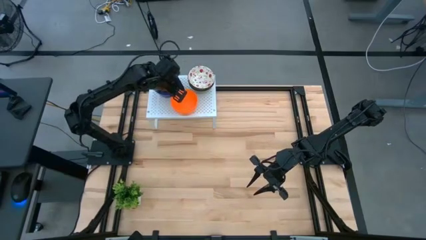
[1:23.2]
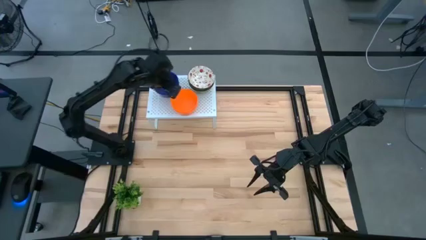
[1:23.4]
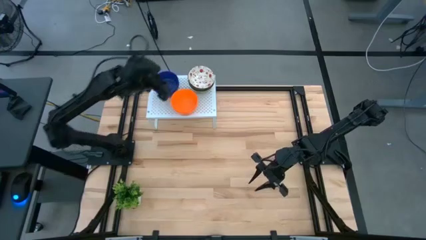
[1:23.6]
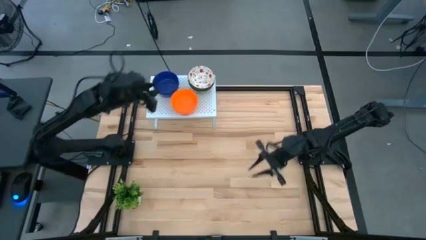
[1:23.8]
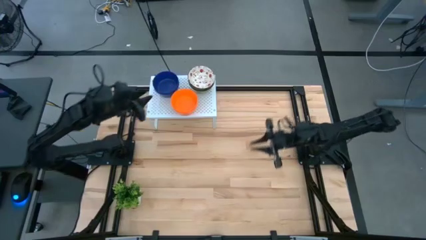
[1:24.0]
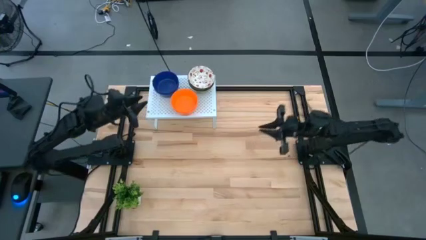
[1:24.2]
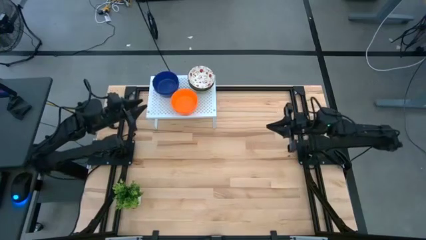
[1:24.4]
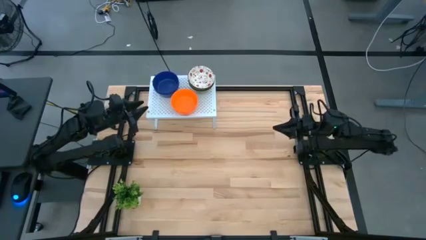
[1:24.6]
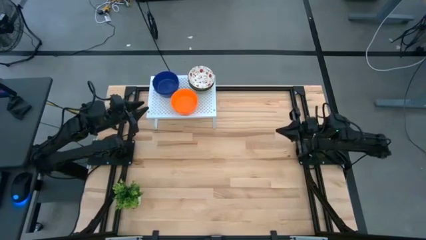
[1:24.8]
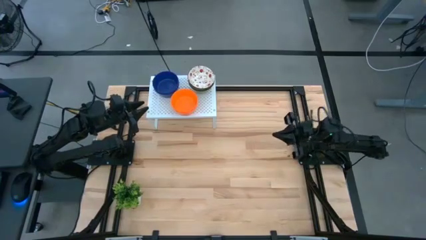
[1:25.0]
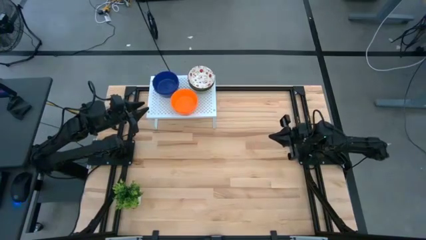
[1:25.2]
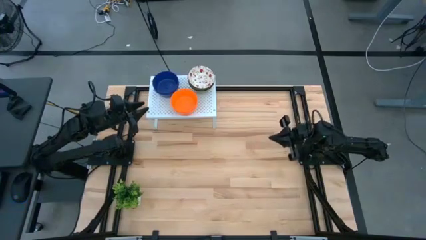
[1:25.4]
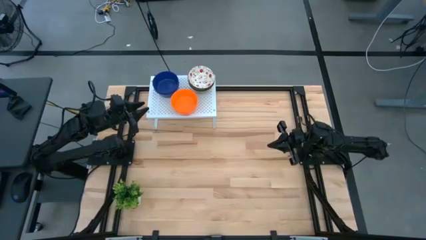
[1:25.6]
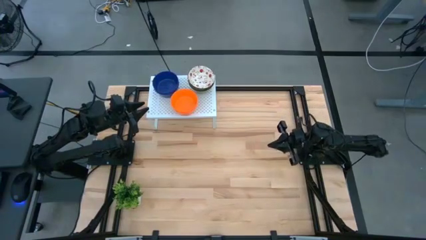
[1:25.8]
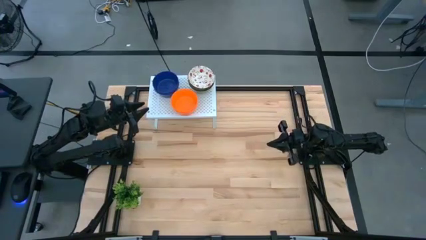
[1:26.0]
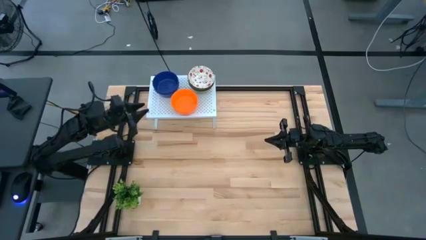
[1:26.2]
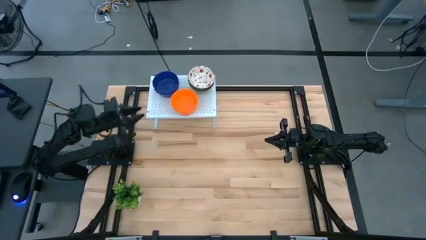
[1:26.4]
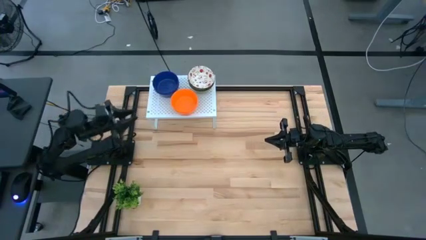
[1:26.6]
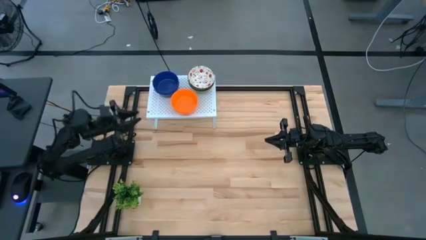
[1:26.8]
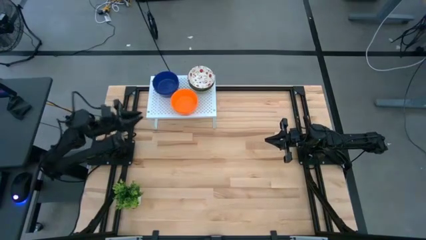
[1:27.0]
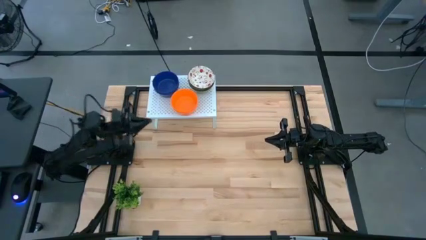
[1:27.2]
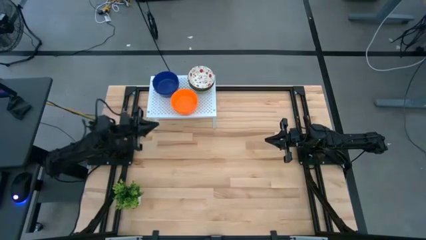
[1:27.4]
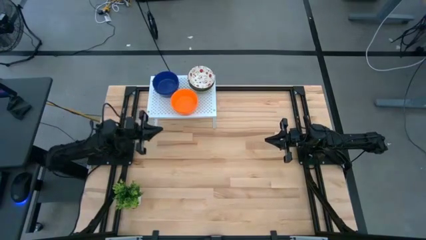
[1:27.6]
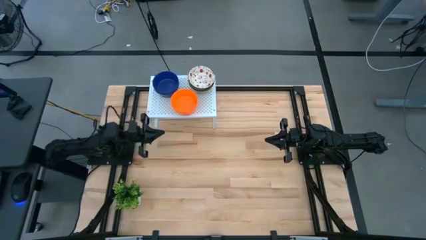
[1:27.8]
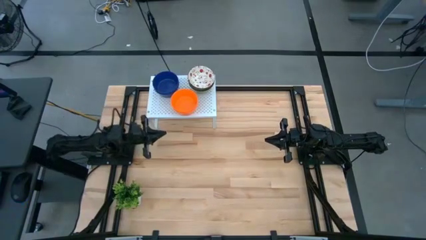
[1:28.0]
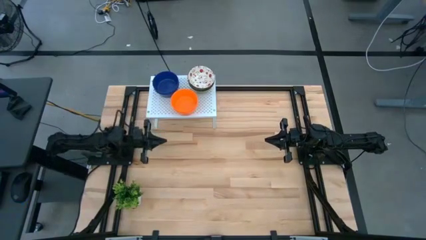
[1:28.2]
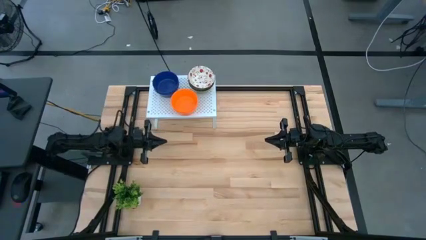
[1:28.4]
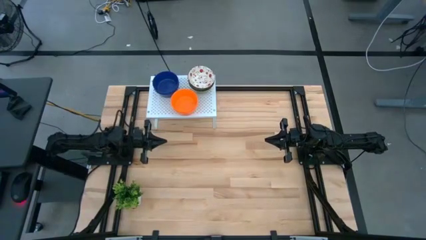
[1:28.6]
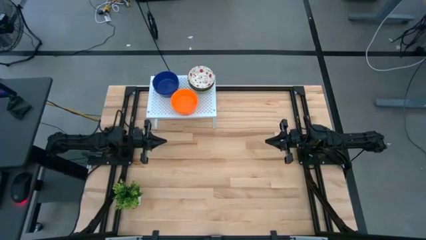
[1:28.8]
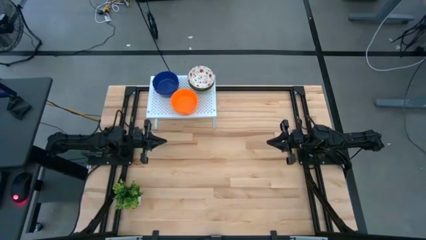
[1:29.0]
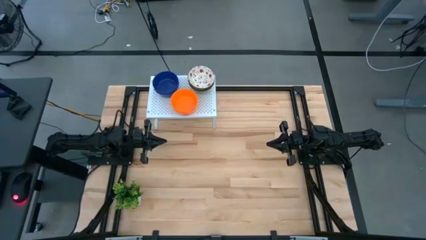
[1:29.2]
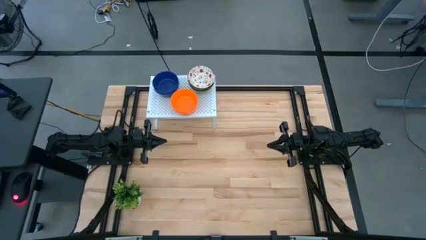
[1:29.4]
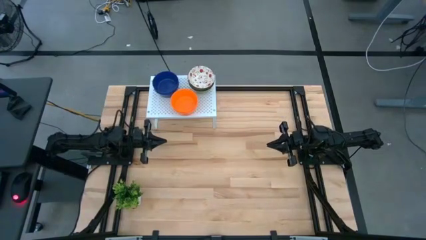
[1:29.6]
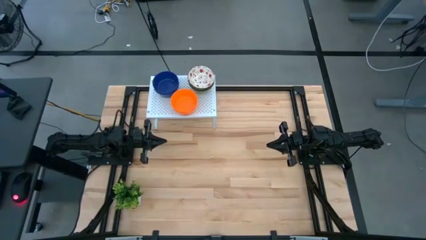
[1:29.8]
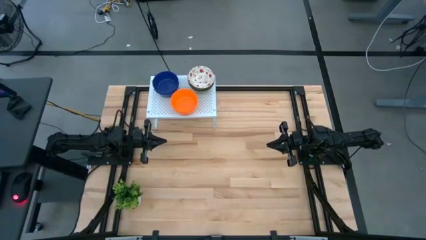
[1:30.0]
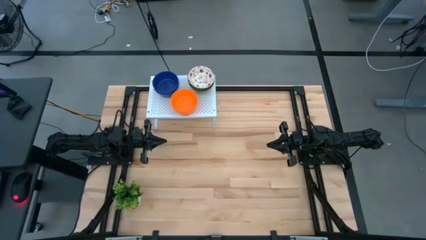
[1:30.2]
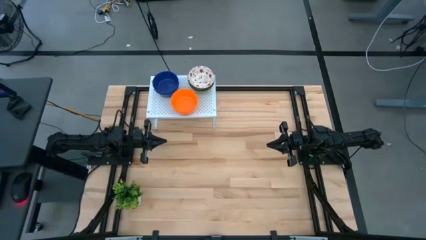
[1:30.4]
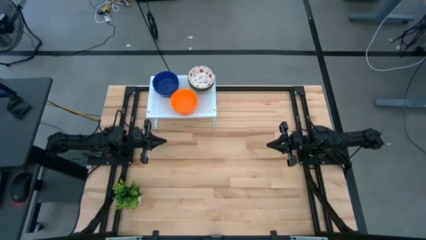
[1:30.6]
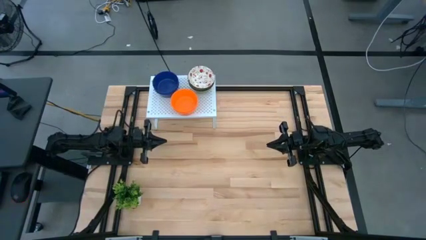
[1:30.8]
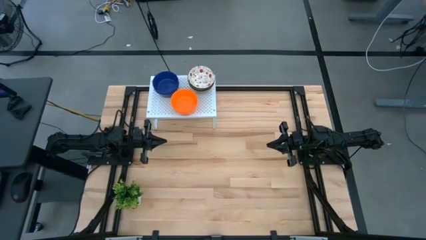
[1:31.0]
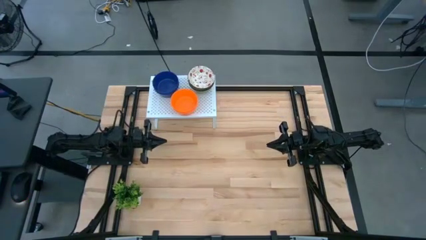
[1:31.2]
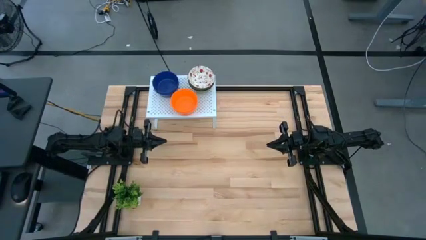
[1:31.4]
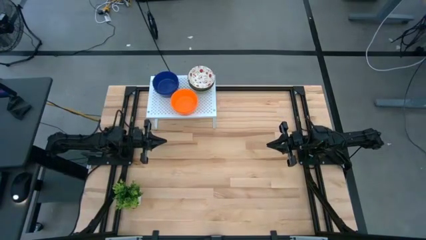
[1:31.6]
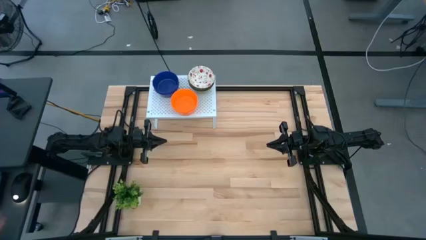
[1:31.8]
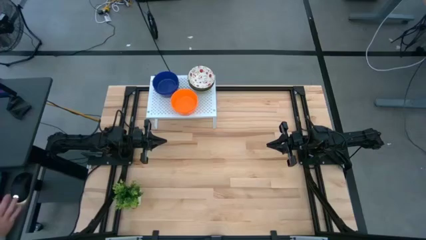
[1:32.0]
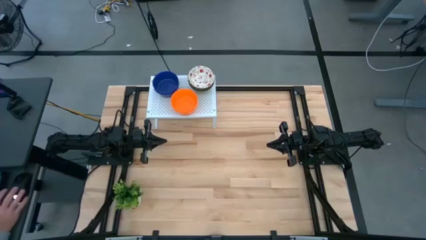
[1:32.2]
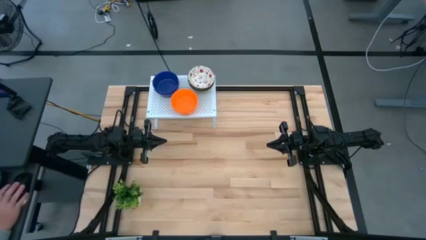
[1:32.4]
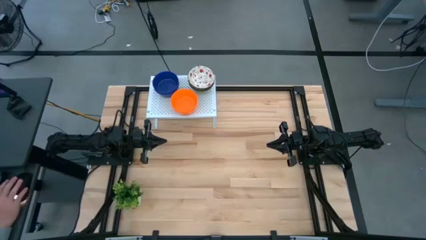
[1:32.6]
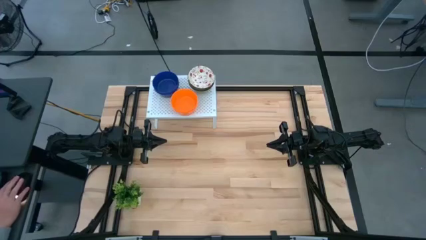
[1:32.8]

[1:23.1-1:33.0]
Task: Pick & Place Mini bowls
Return to Home Position

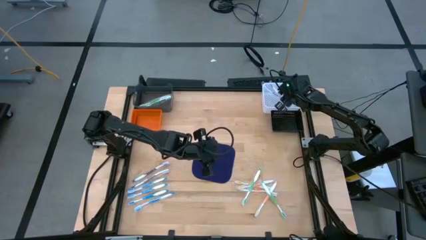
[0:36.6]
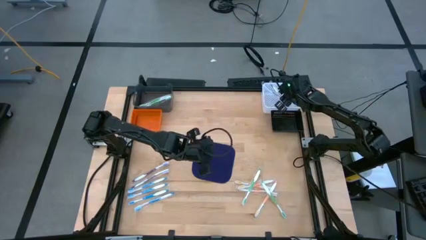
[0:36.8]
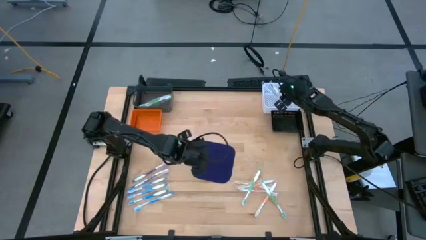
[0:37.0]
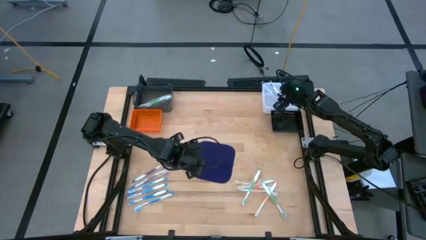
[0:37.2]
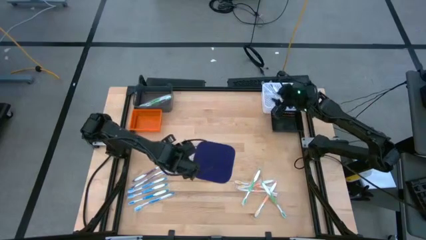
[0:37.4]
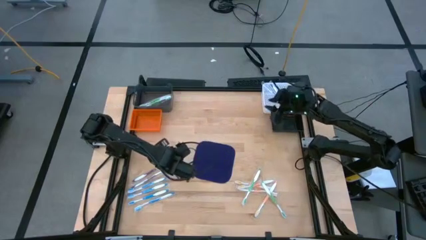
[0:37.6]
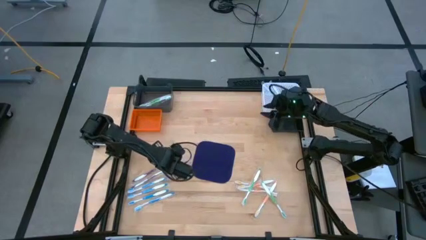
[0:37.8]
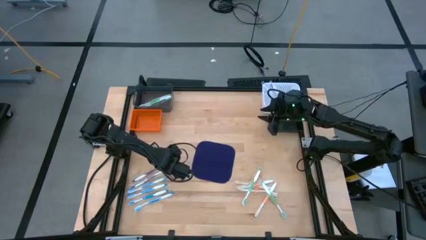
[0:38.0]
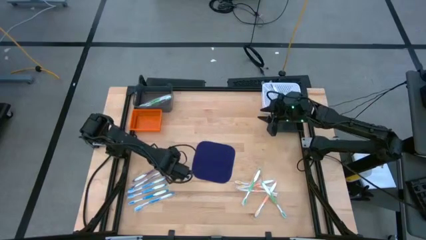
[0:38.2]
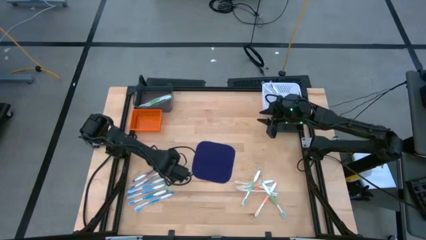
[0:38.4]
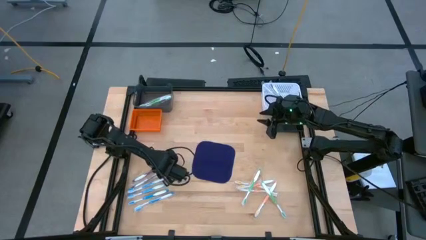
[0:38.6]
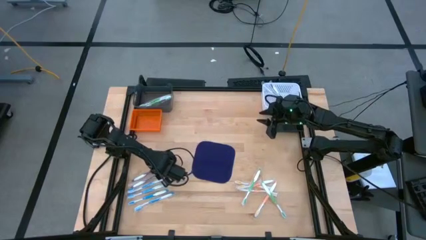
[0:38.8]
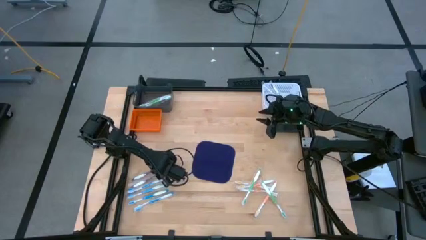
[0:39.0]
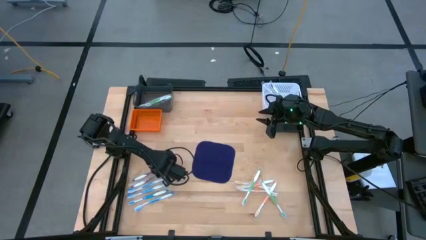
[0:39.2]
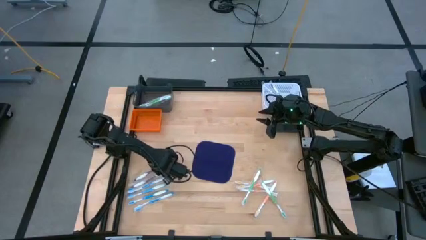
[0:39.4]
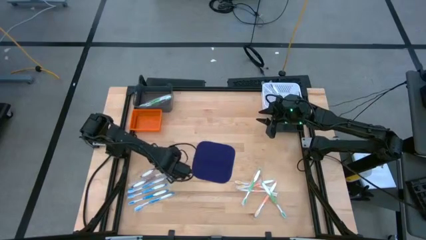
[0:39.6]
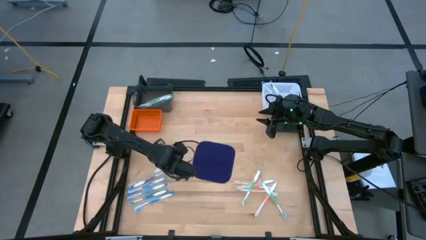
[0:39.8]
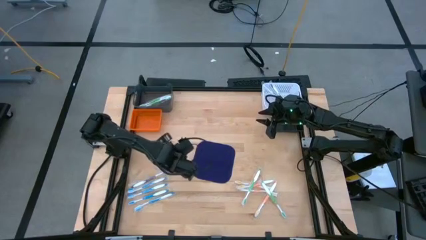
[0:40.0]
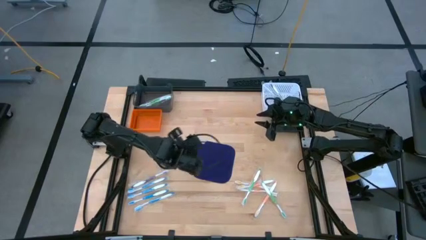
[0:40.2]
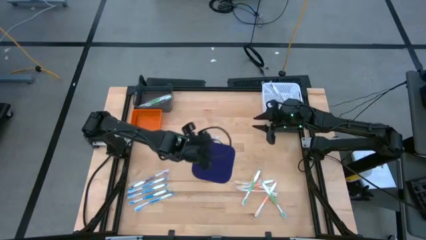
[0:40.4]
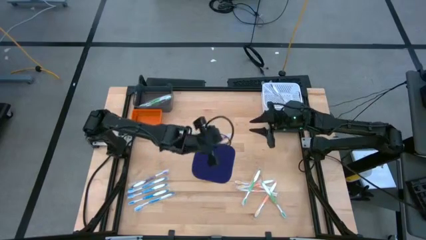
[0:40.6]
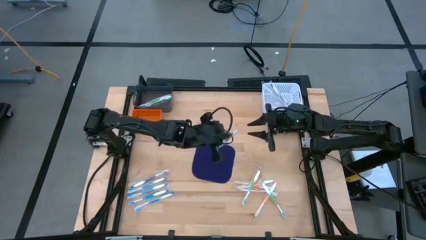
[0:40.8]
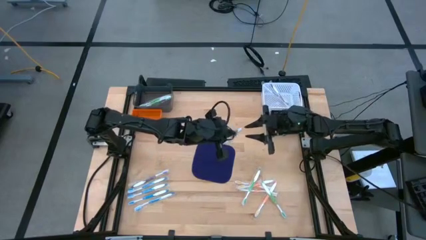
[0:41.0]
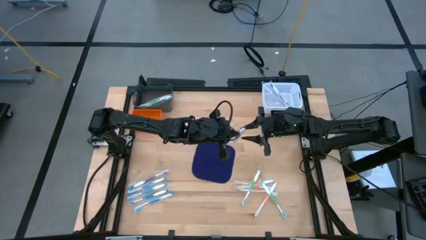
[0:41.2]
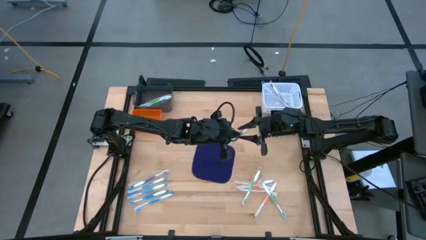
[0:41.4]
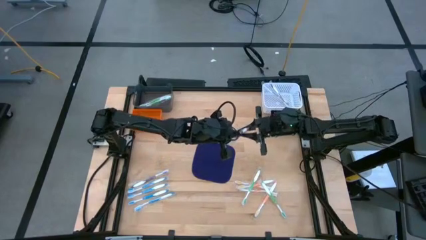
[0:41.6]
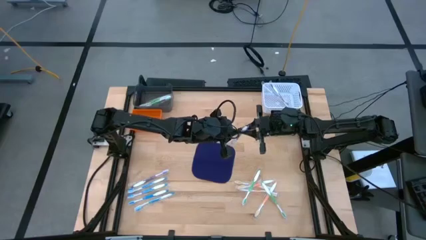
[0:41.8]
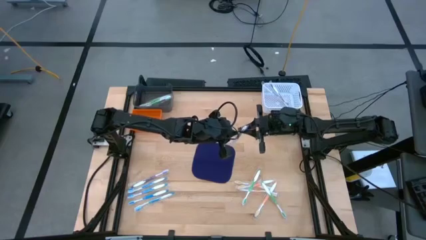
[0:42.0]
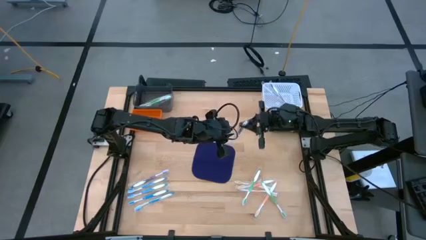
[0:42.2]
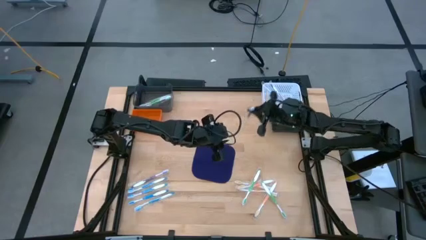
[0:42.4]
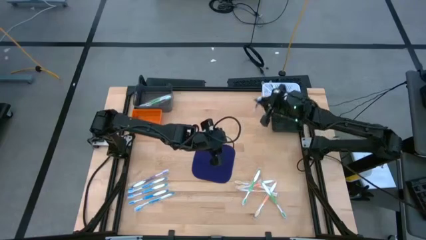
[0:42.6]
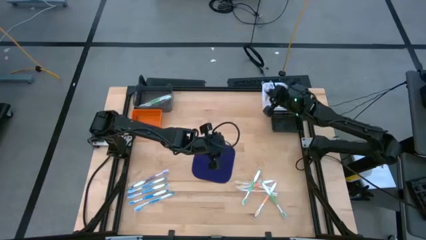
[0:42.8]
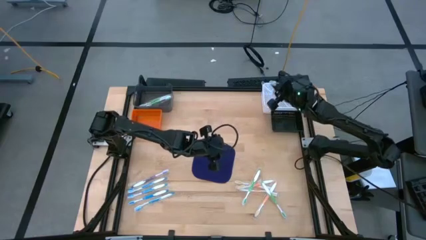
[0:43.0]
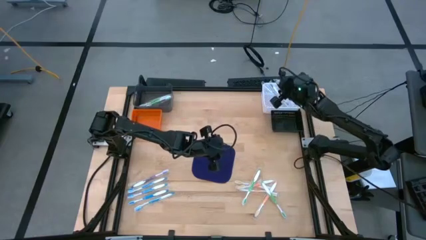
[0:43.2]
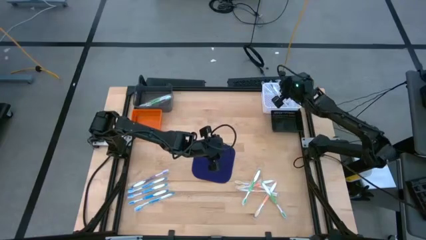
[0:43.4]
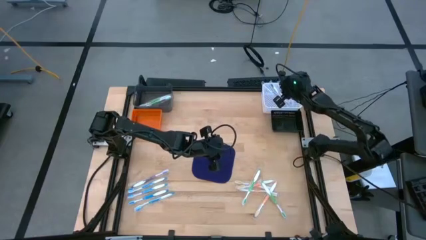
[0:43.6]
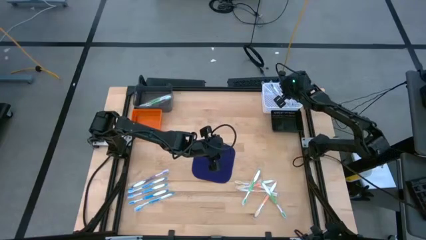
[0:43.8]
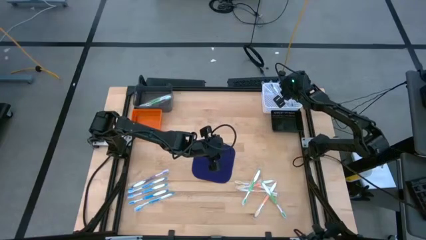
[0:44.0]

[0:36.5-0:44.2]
Task: Pick & Place Toothbrushes
Put the purple toothbrush into the white bin
